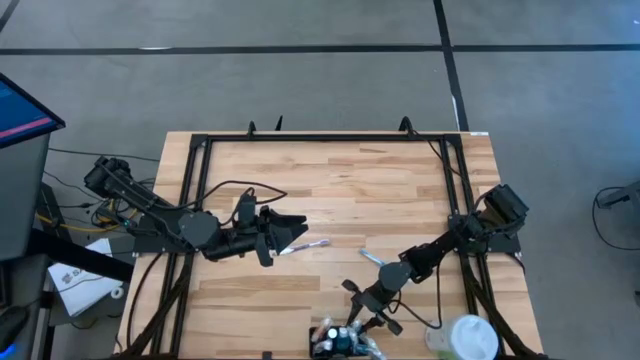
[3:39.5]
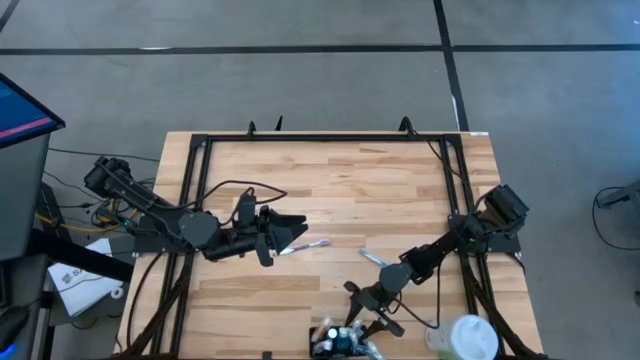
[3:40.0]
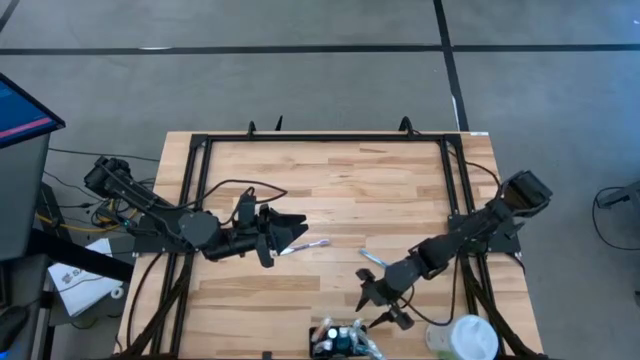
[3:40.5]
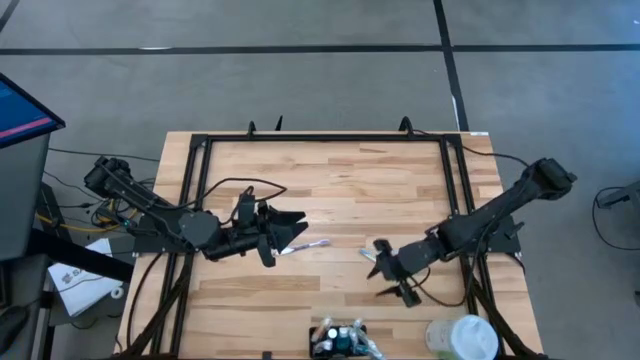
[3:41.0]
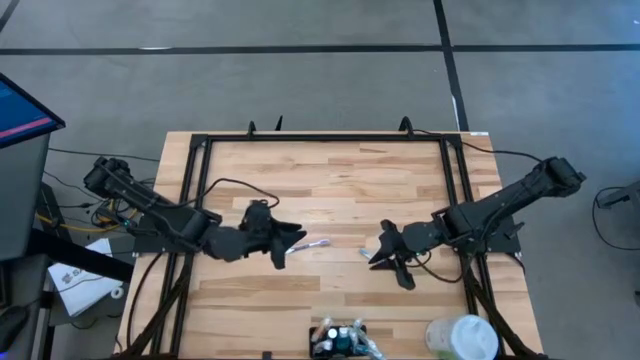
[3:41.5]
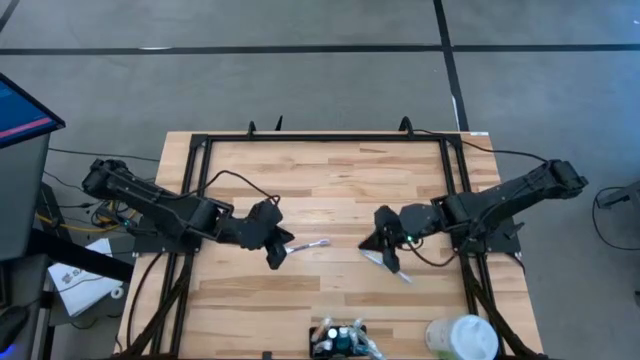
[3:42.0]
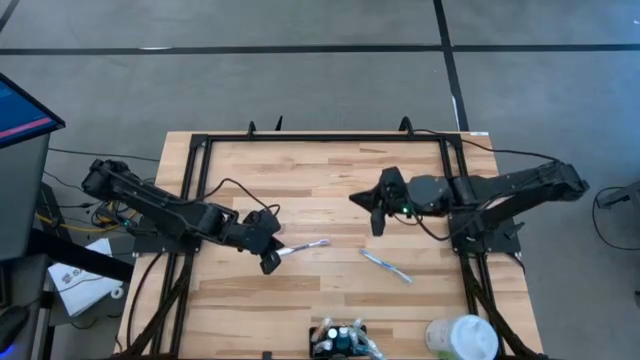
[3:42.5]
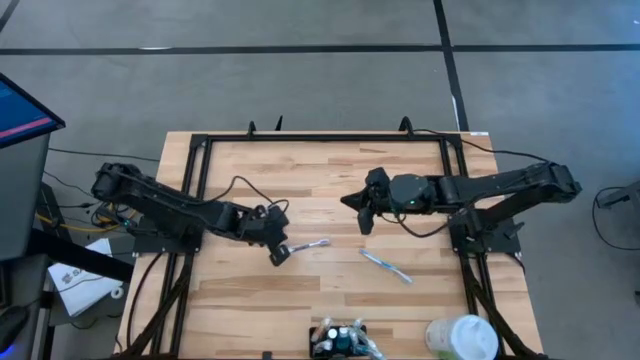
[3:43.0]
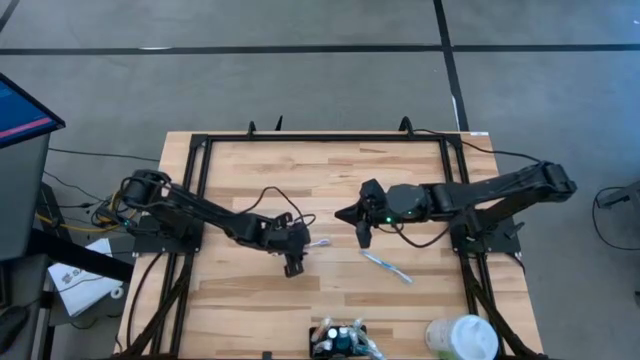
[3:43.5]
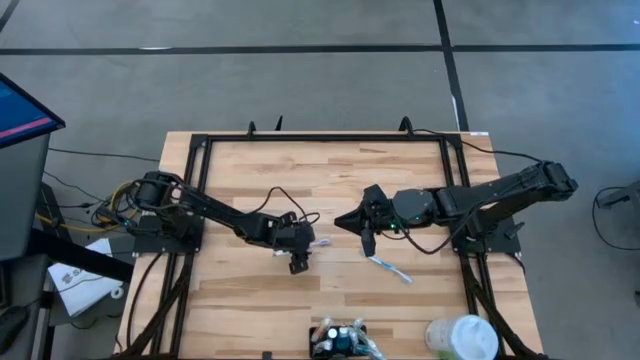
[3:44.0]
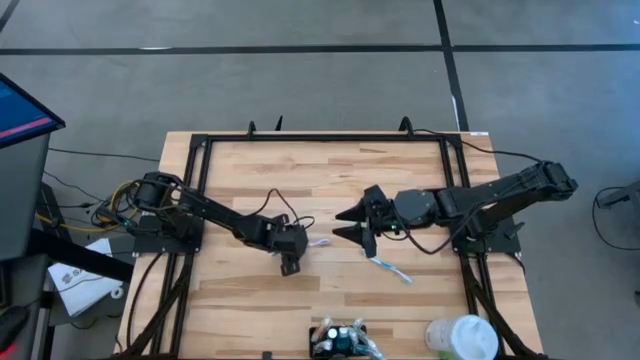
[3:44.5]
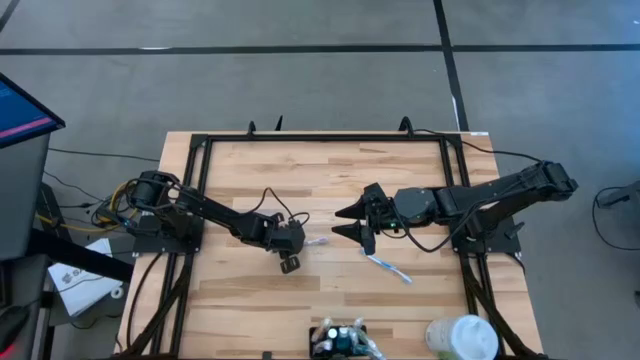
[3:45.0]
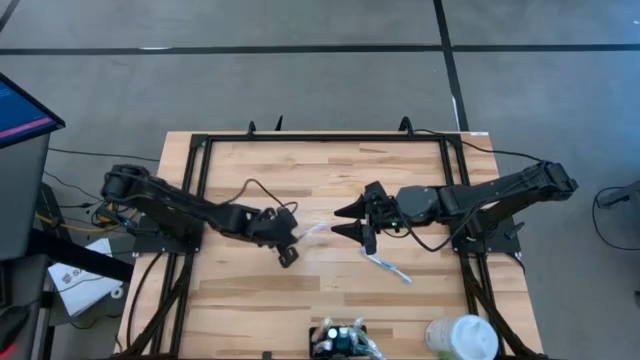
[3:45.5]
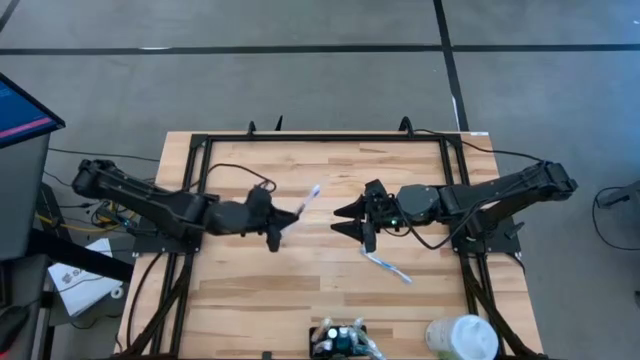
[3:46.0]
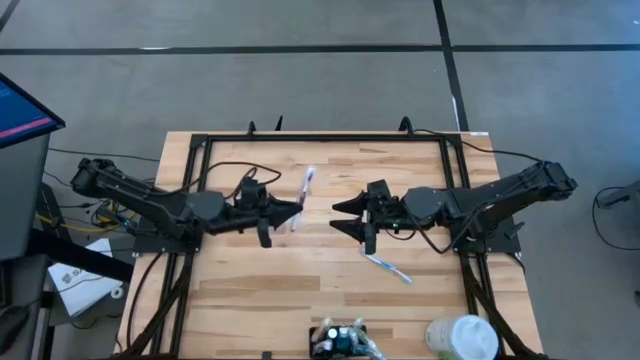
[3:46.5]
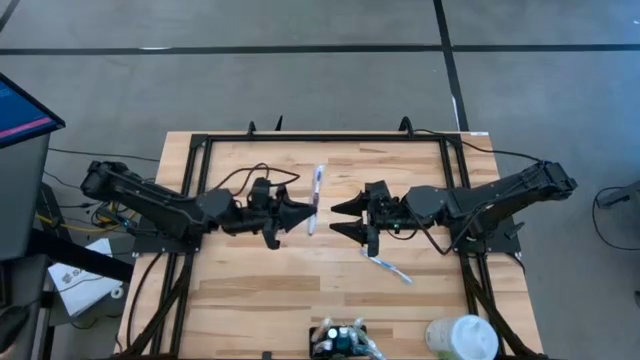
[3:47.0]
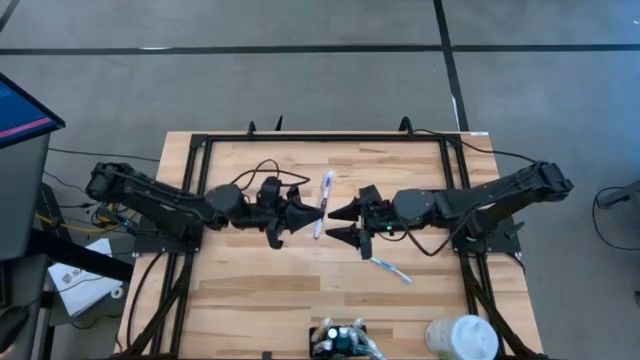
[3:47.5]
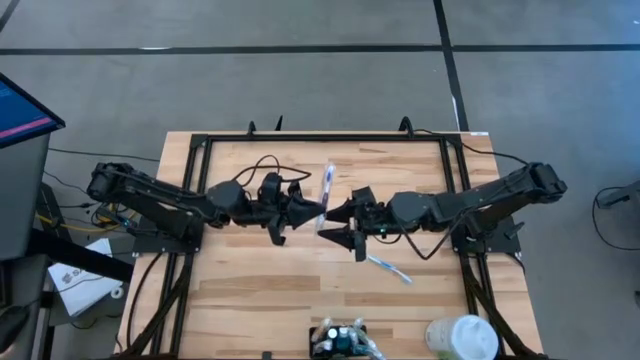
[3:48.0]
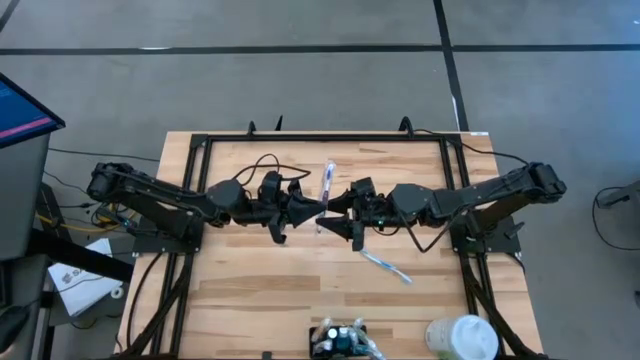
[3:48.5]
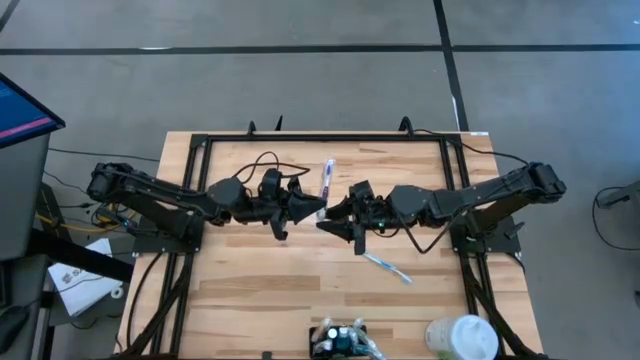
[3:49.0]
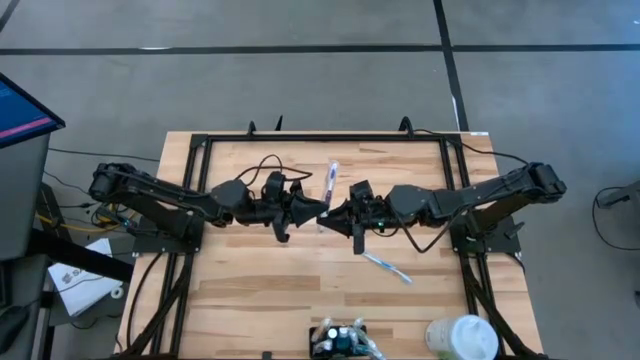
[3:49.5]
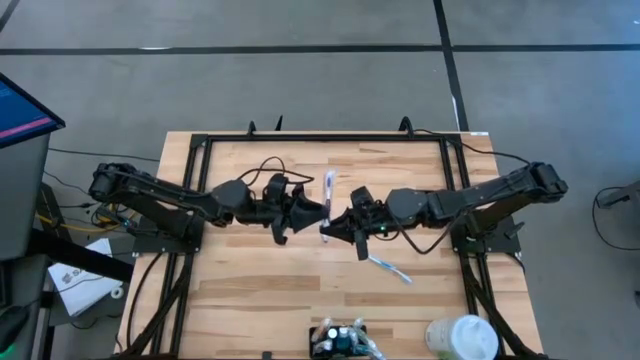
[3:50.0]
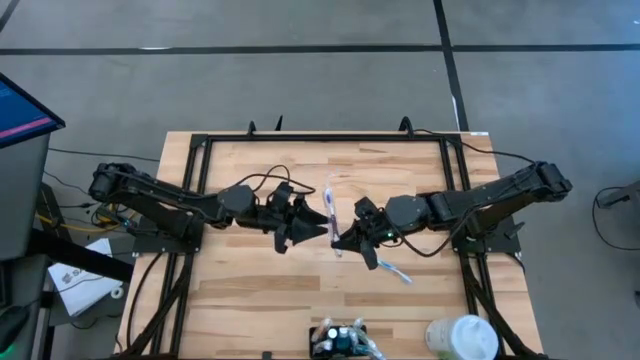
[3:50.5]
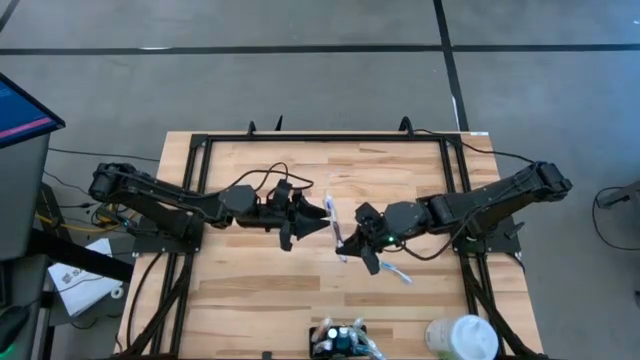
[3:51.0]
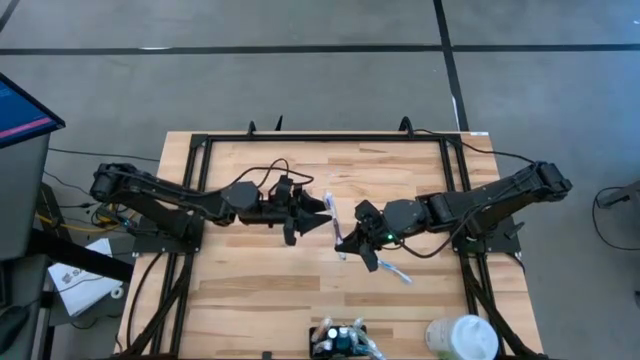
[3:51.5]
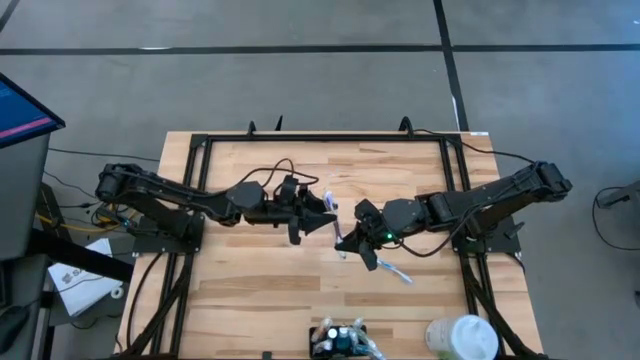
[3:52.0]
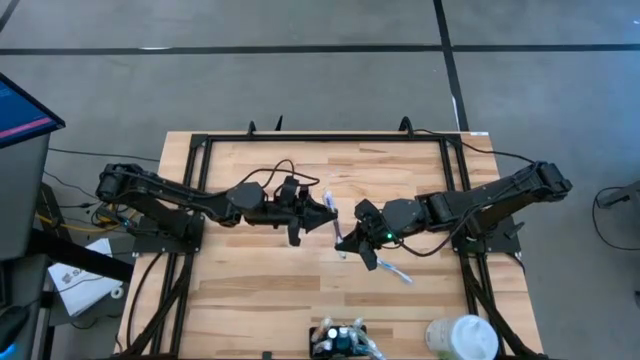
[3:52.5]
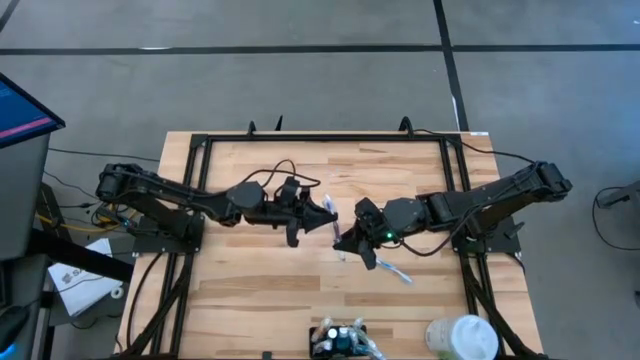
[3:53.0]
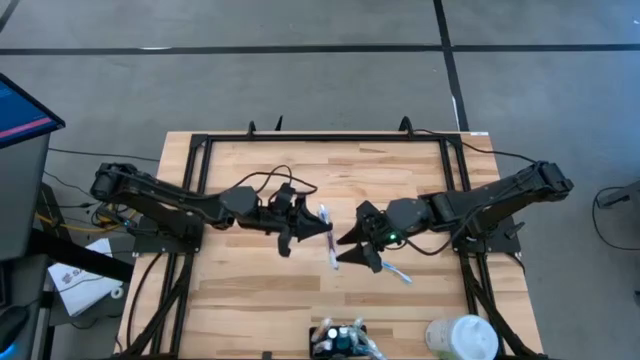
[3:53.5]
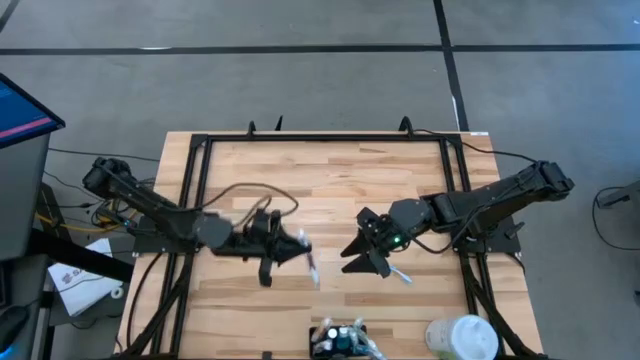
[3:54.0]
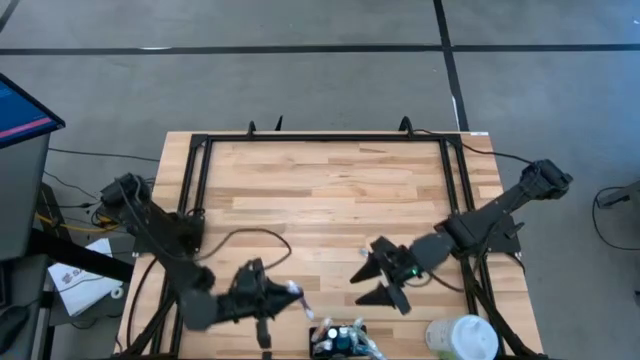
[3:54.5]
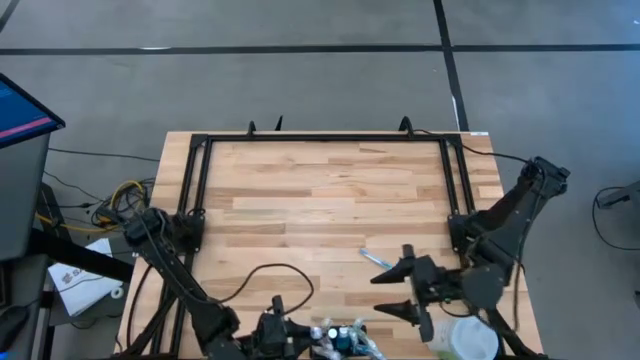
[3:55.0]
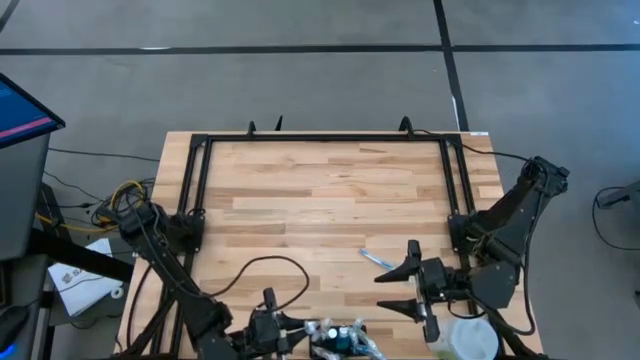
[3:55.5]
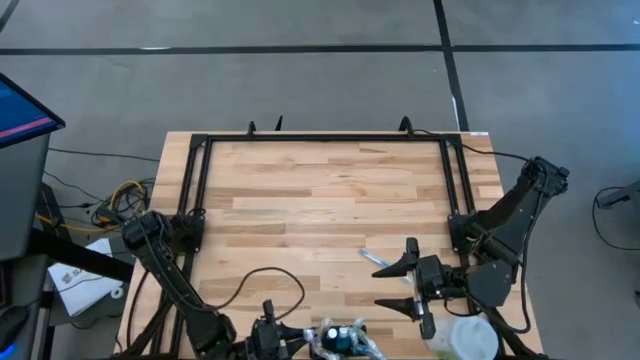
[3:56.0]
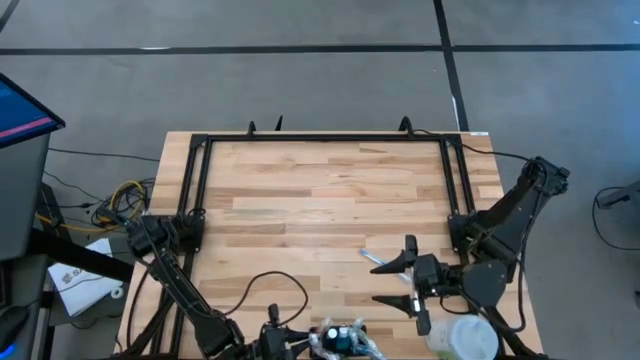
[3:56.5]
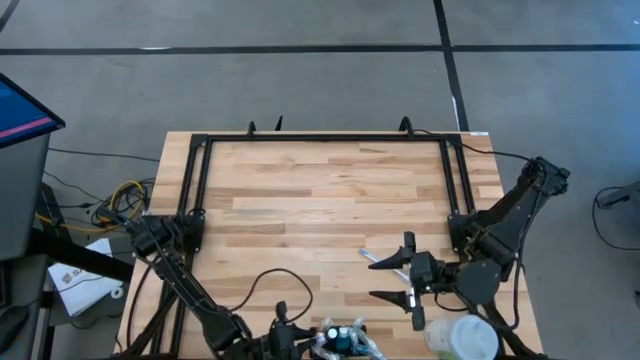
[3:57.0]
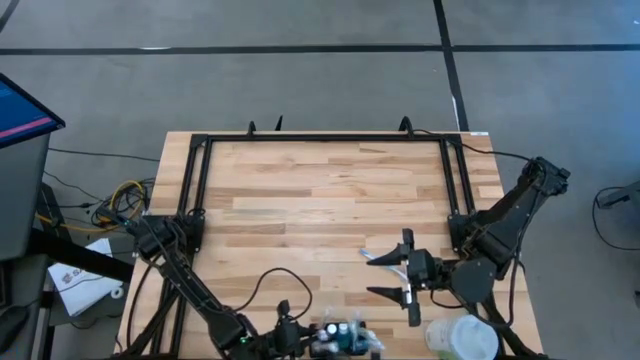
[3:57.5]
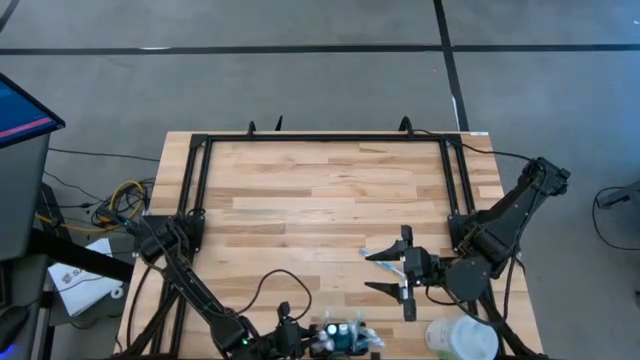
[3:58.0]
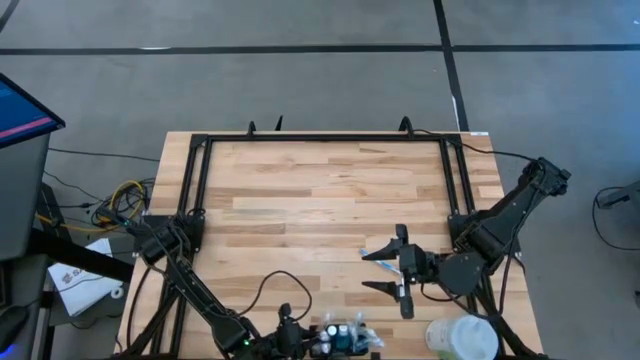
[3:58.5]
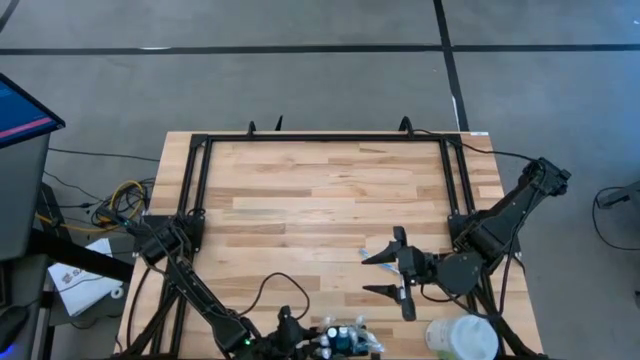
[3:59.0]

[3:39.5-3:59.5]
Task: Pick & Place toothbrushing station
Put the purple toothbrush into the black mesh organizer
